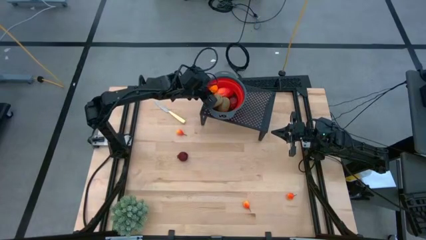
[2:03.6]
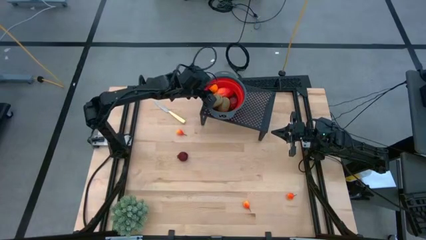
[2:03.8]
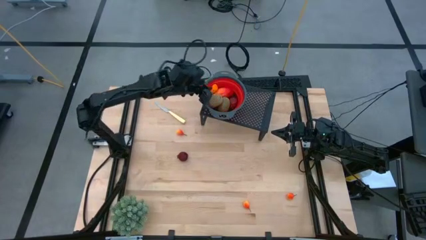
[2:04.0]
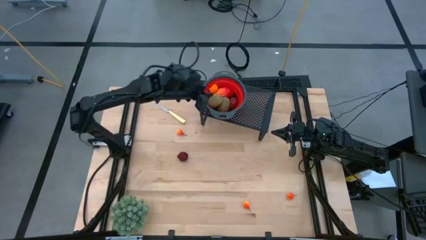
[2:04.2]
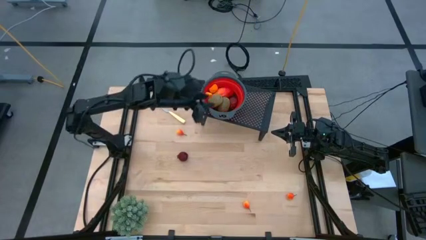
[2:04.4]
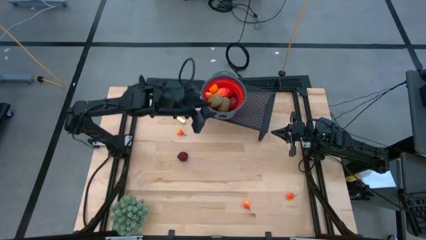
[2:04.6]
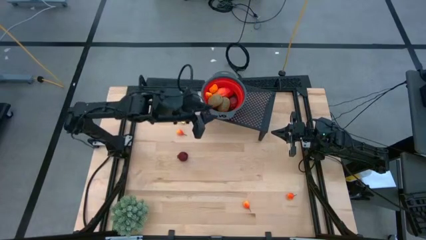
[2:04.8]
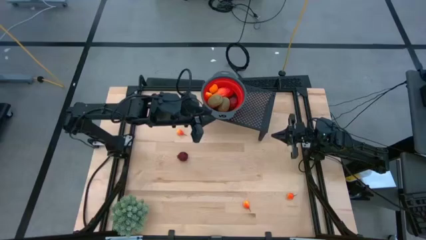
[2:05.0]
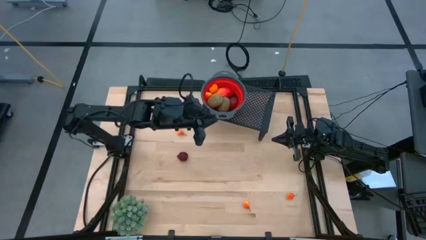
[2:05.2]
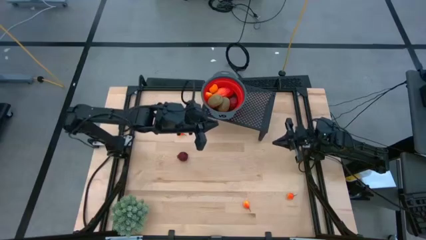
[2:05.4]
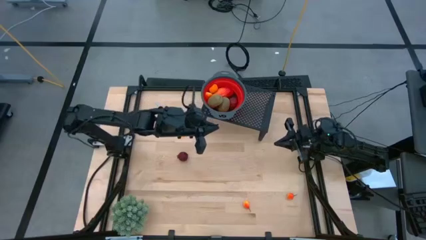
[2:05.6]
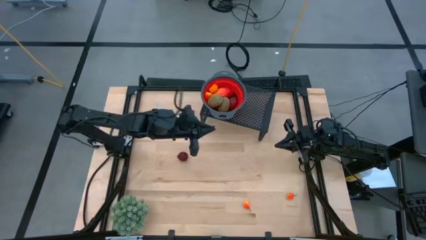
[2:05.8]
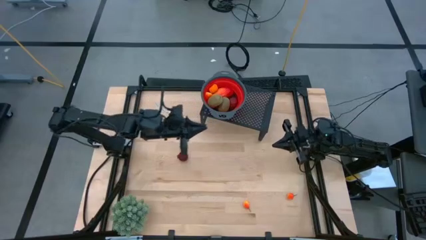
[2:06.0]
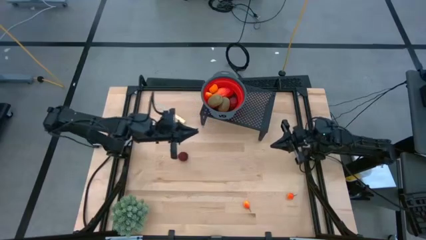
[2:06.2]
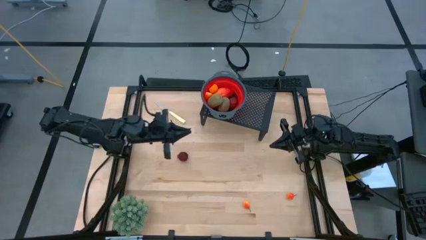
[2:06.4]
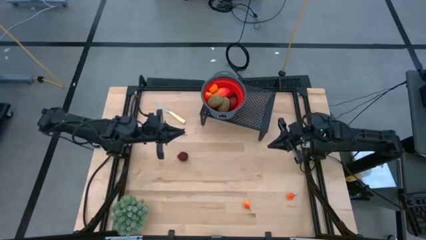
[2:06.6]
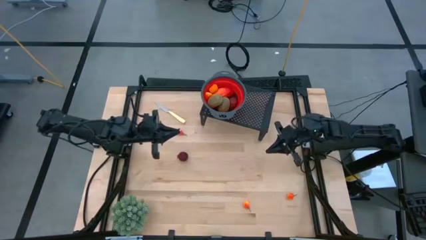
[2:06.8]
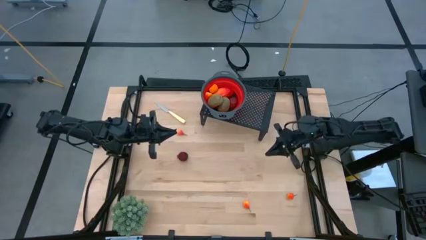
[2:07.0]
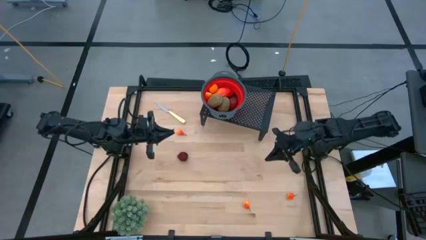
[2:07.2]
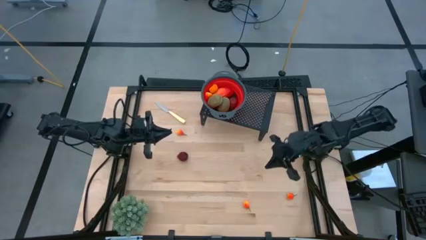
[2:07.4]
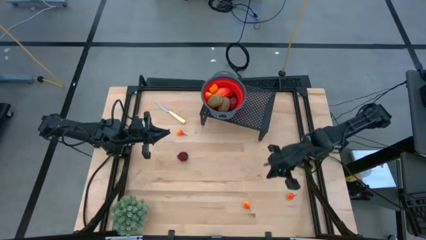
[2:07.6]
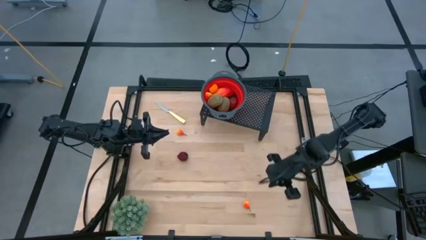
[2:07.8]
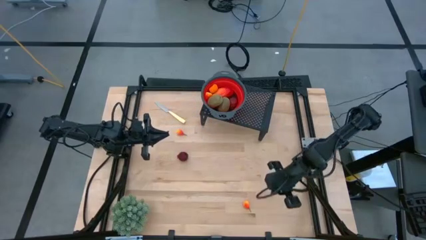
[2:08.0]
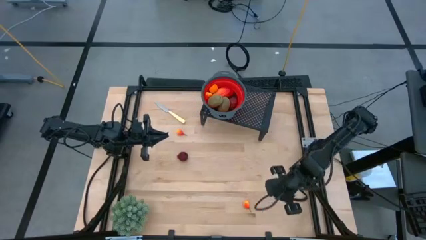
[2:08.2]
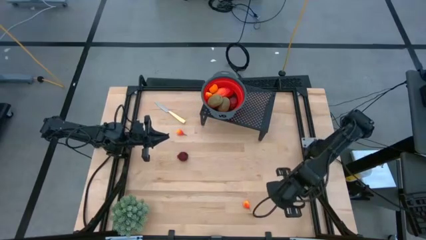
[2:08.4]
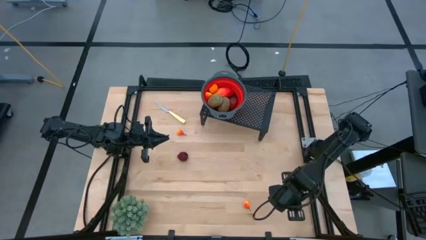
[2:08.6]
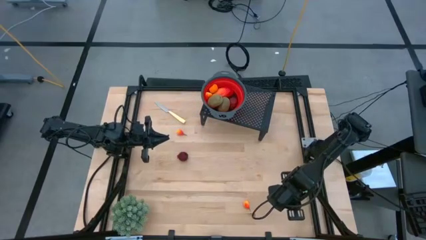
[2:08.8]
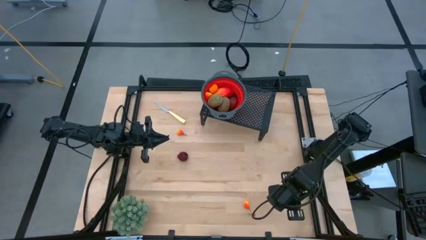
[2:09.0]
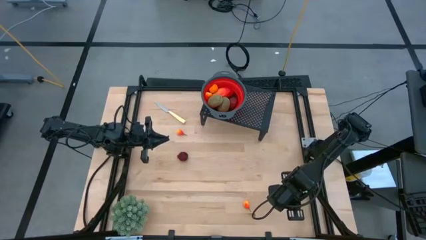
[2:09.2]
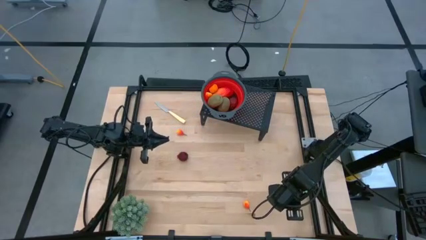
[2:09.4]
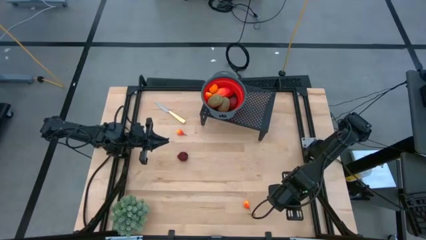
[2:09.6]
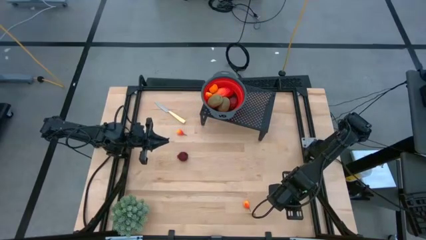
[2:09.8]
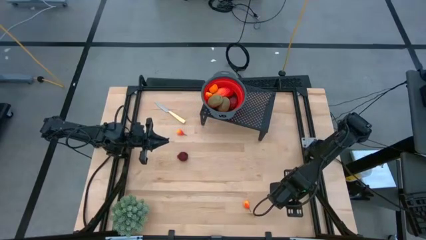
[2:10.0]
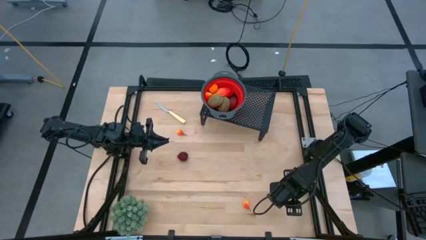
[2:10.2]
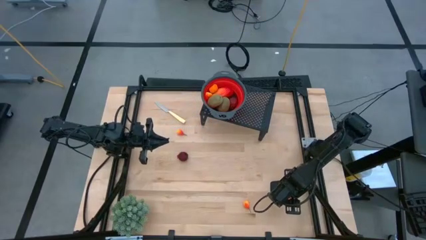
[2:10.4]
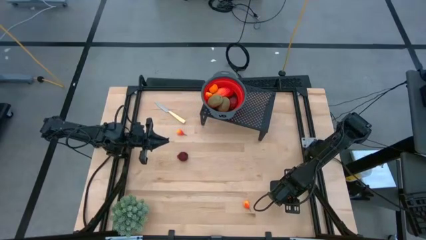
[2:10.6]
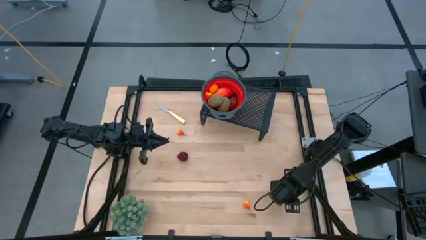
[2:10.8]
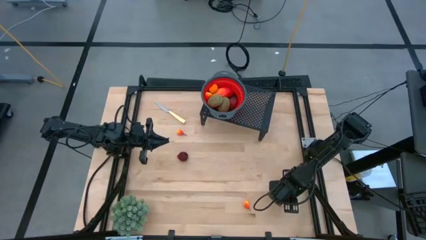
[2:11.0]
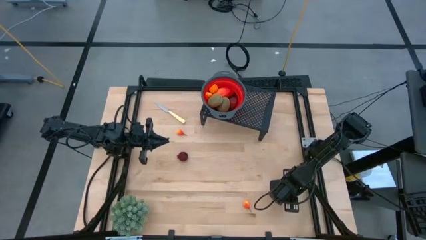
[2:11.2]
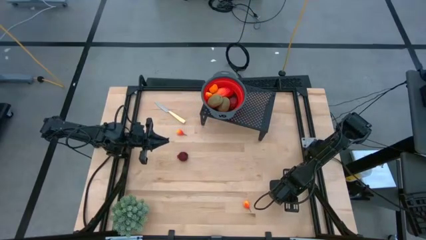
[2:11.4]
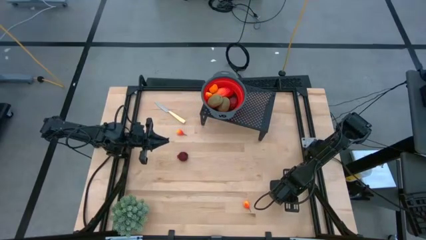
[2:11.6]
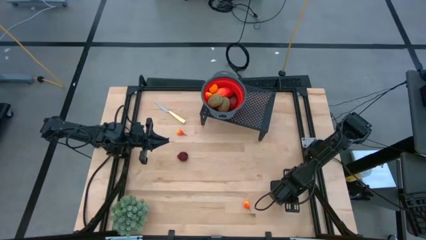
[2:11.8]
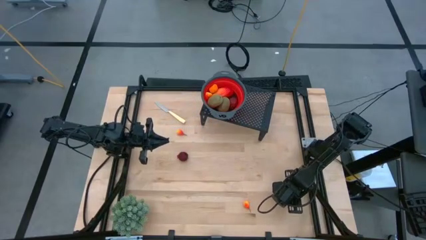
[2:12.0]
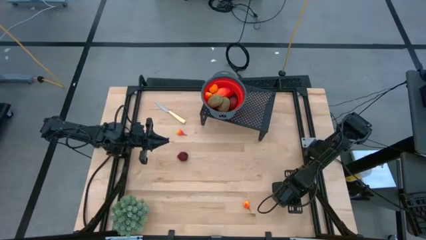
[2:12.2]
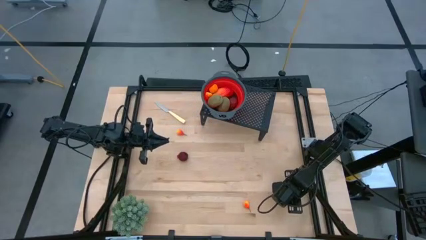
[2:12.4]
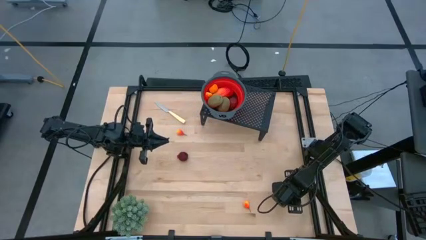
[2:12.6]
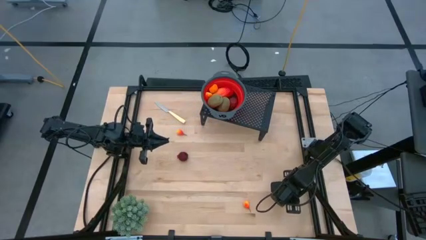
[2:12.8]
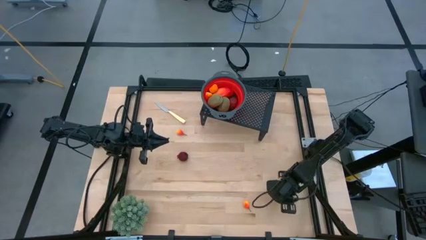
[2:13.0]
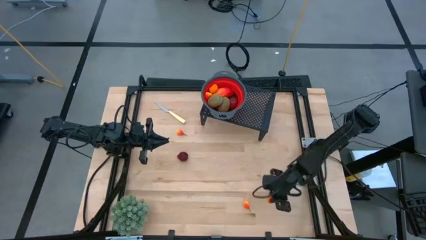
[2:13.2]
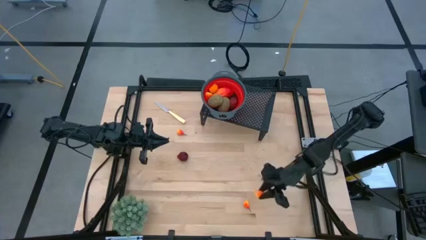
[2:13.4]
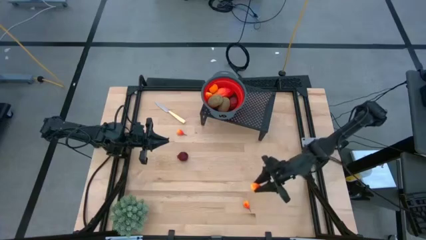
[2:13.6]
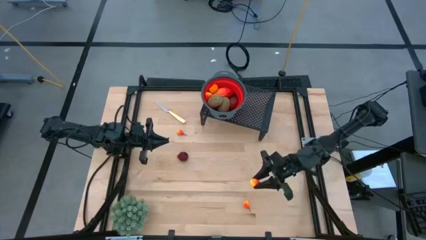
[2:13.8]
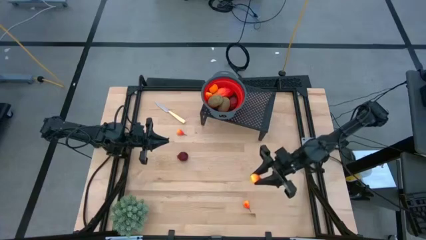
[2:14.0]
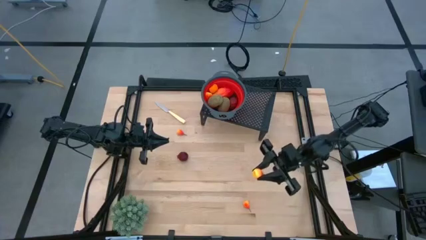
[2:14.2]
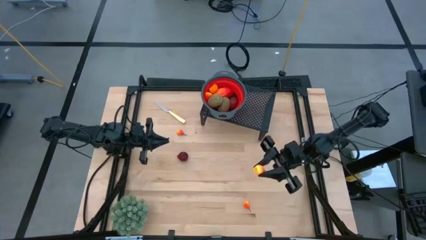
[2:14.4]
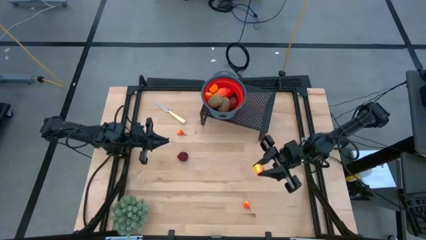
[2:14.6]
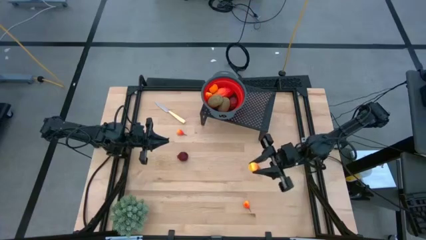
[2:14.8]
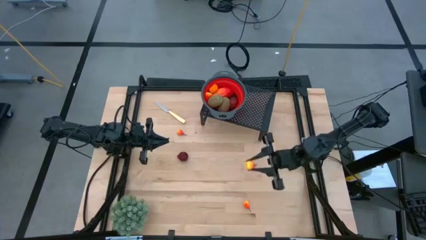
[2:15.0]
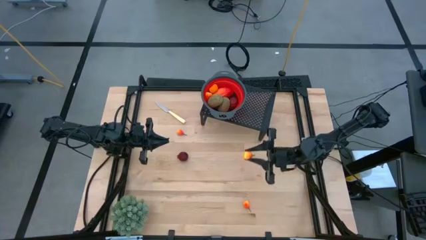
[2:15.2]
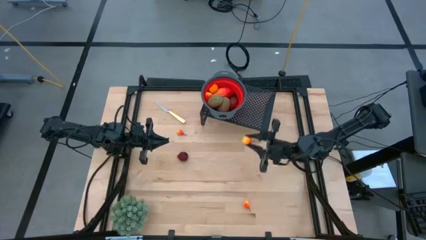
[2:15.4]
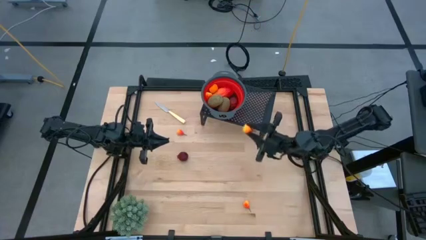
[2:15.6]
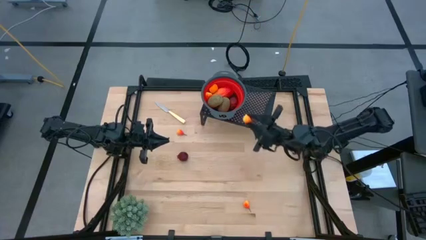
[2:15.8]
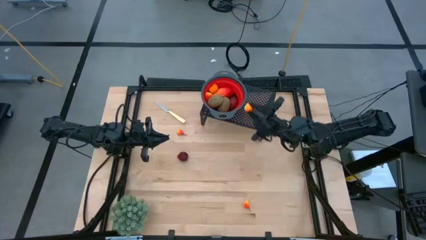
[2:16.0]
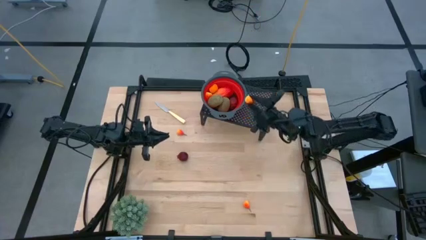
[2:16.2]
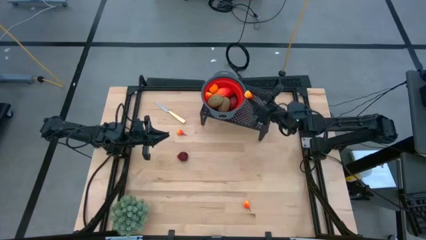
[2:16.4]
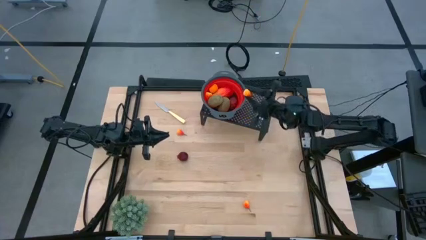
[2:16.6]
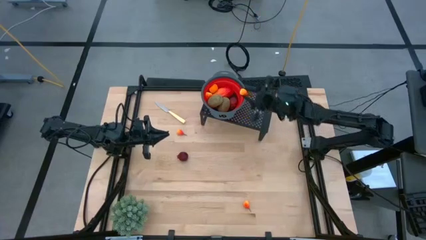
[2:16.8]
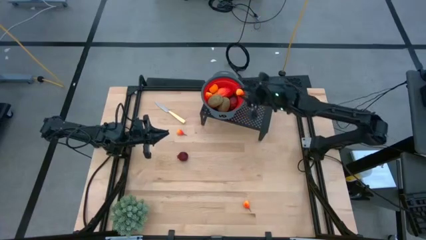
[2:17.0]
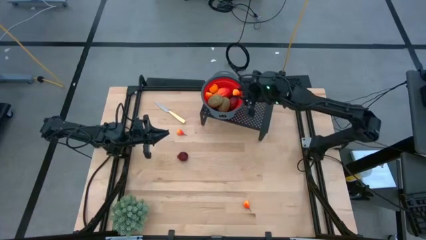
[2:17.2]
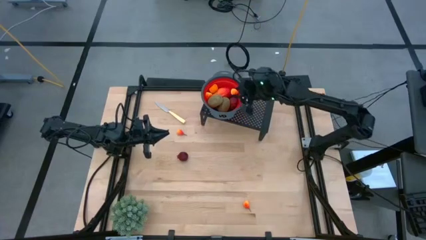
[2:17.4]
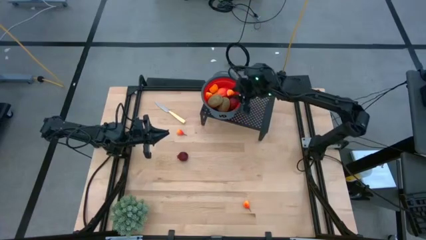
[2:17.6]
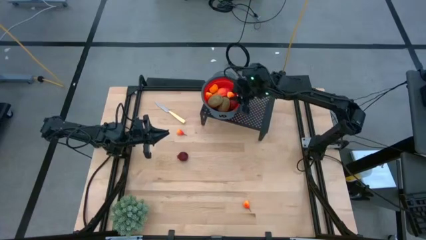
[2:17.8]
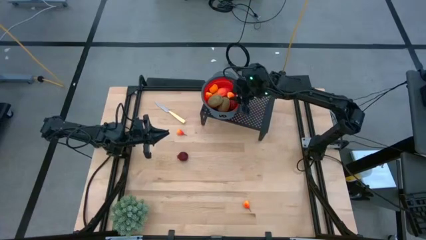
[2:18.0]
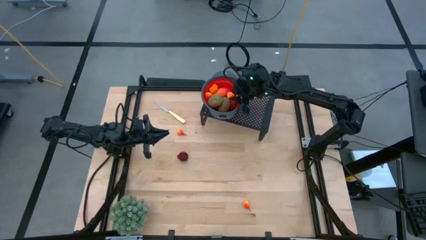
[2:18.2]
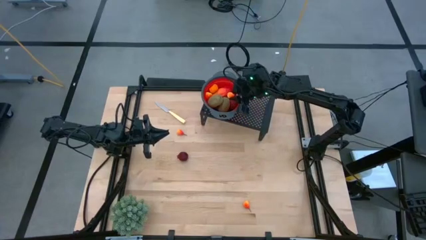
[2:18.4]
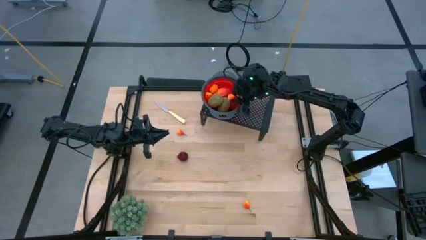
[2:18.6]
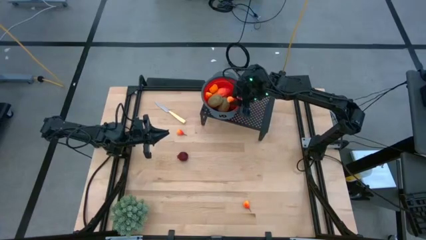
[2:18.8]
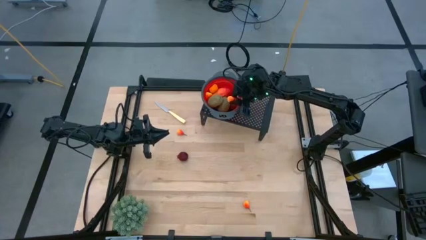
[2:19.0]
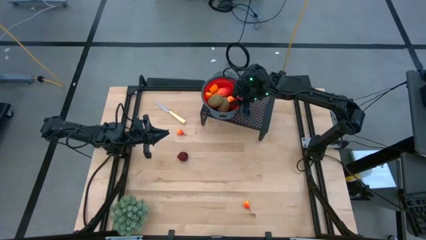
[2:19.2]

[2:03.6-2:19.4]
Task: Pick & Place Fruit
Put the right pear into the strainer bowl on the shelf
